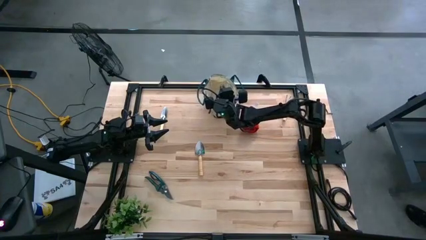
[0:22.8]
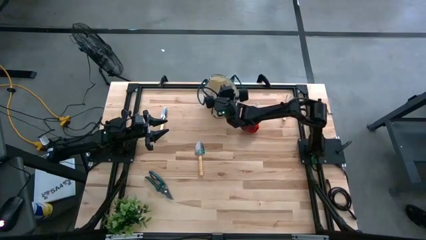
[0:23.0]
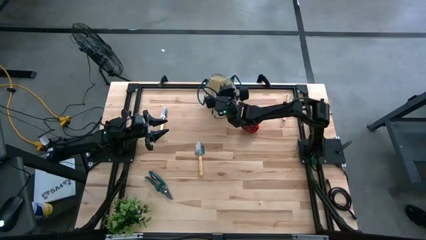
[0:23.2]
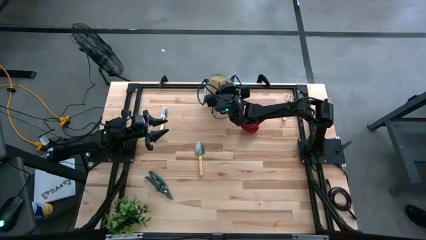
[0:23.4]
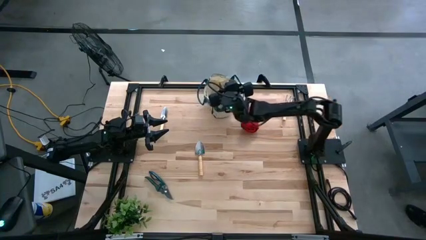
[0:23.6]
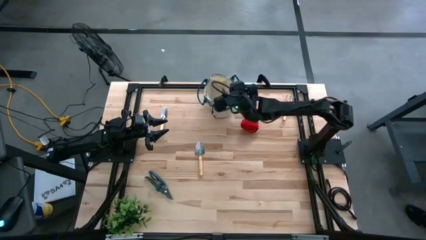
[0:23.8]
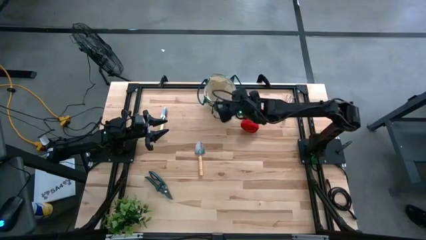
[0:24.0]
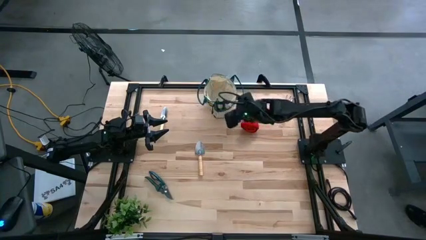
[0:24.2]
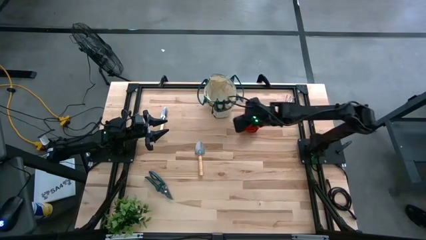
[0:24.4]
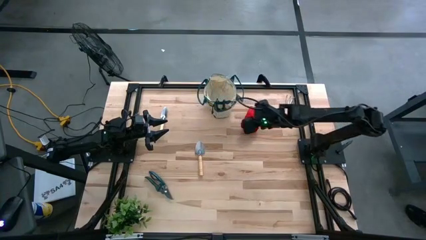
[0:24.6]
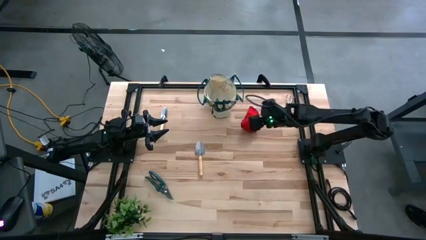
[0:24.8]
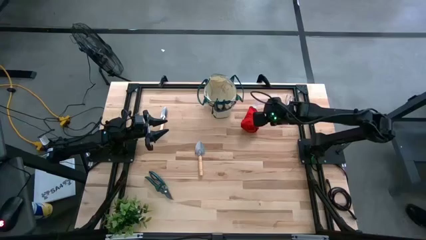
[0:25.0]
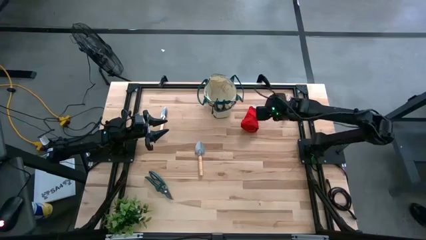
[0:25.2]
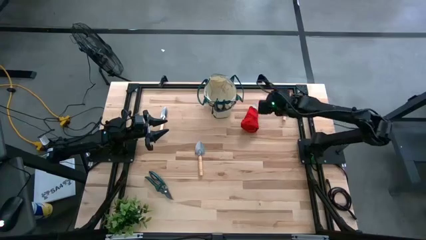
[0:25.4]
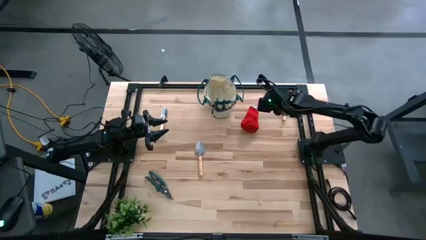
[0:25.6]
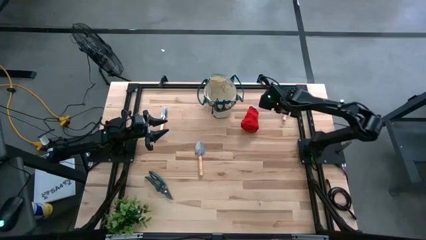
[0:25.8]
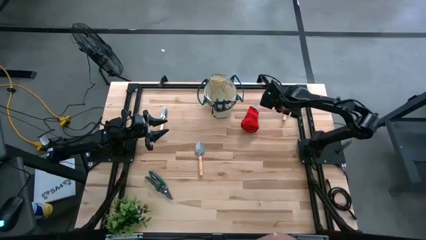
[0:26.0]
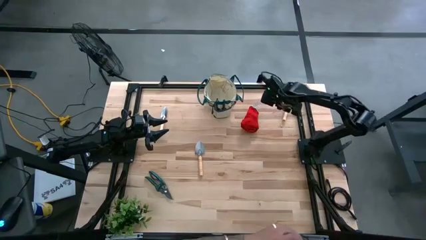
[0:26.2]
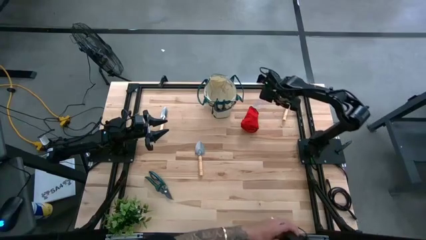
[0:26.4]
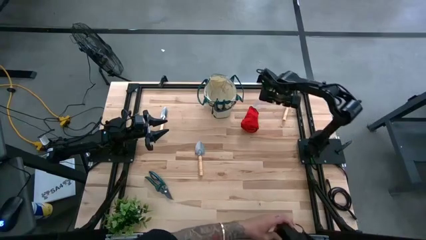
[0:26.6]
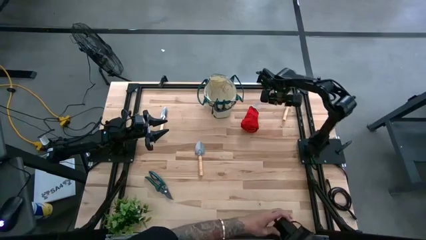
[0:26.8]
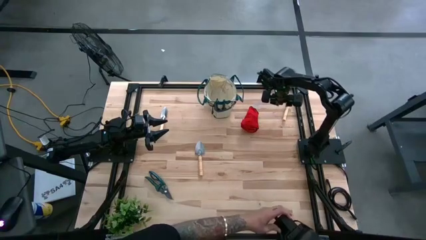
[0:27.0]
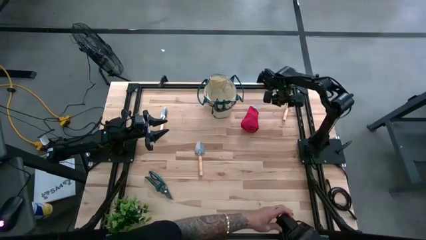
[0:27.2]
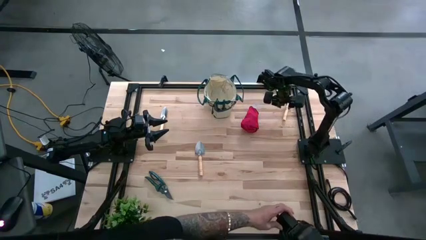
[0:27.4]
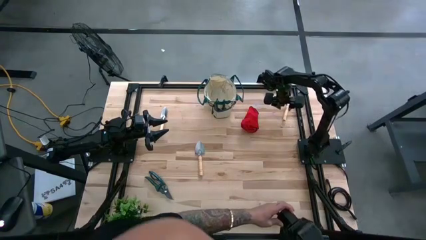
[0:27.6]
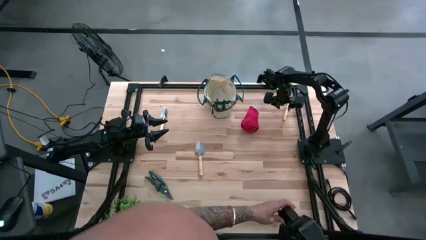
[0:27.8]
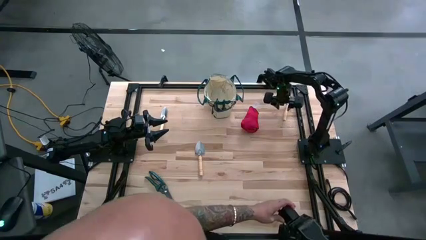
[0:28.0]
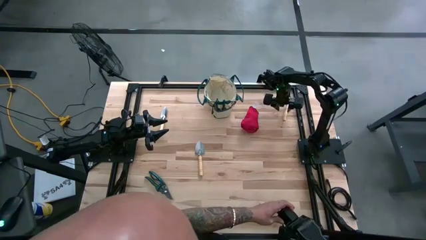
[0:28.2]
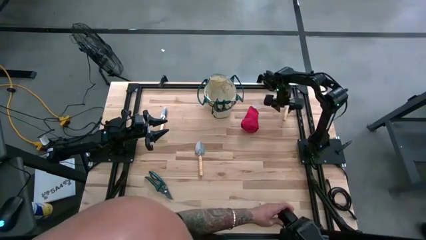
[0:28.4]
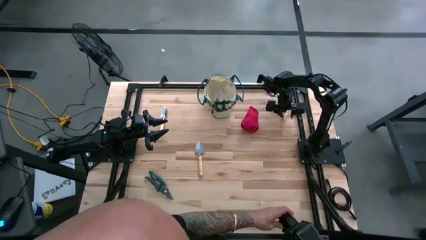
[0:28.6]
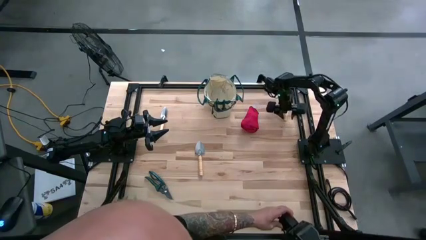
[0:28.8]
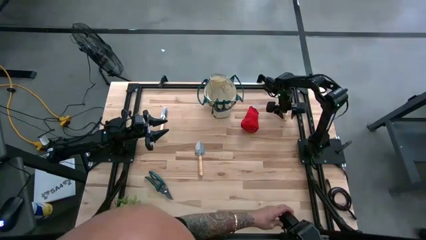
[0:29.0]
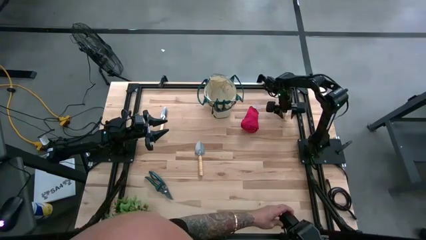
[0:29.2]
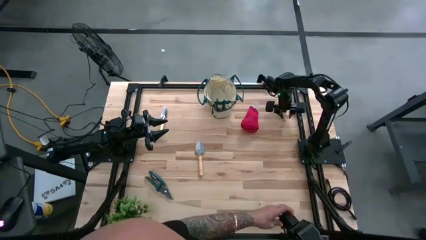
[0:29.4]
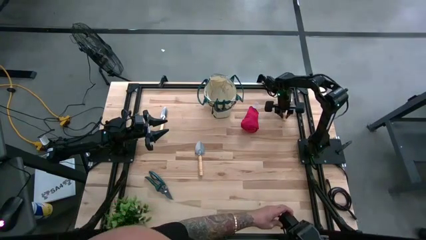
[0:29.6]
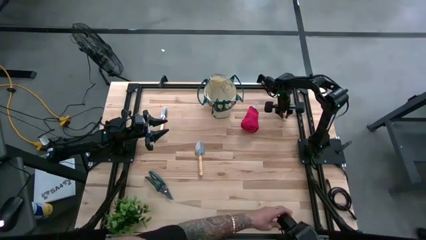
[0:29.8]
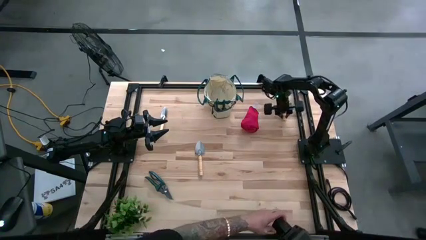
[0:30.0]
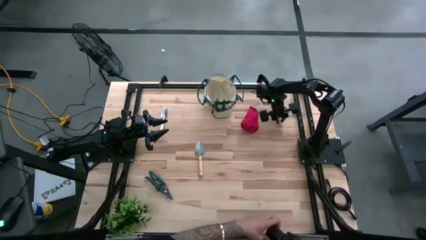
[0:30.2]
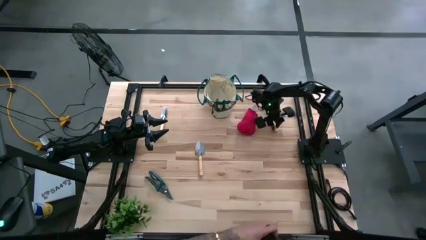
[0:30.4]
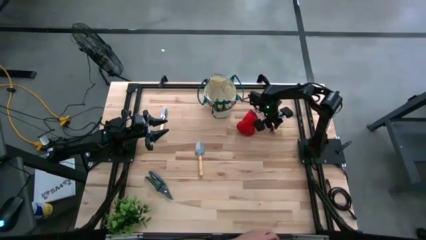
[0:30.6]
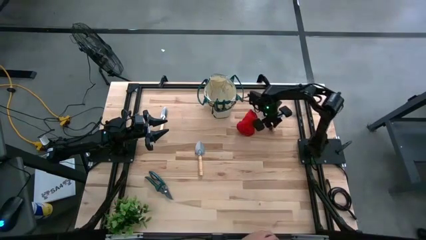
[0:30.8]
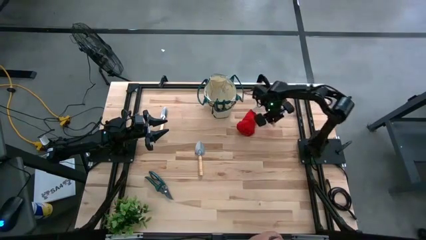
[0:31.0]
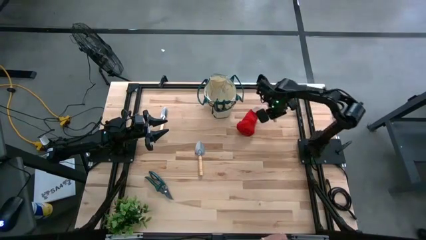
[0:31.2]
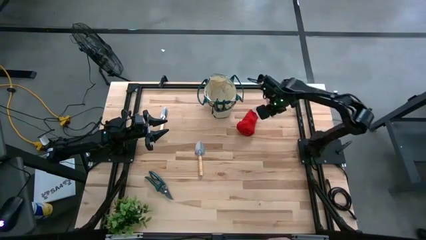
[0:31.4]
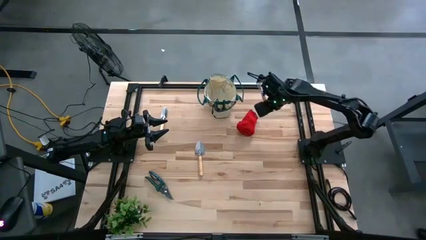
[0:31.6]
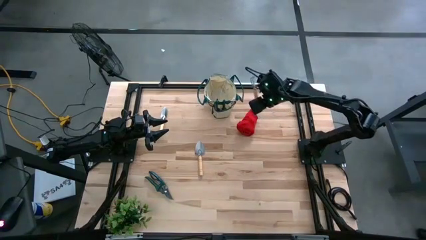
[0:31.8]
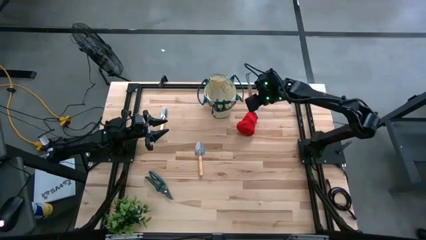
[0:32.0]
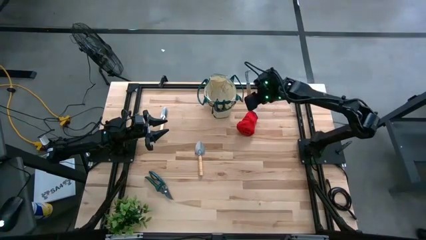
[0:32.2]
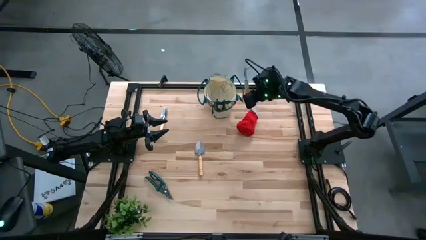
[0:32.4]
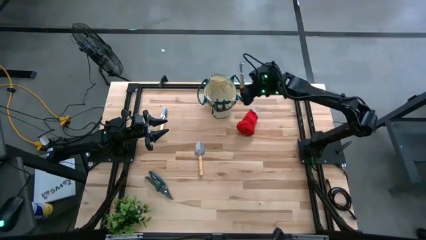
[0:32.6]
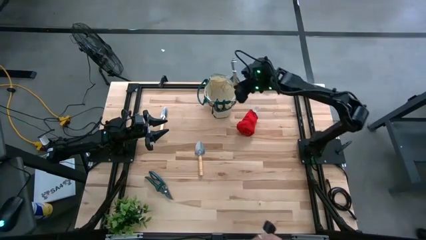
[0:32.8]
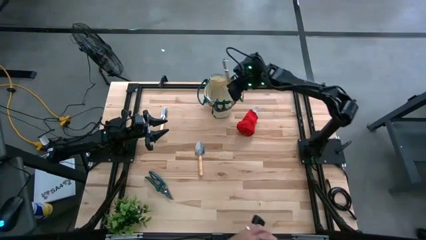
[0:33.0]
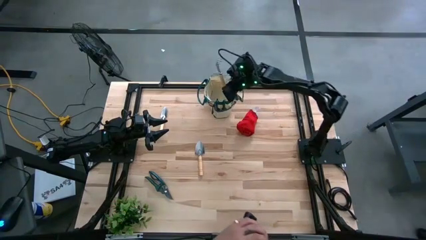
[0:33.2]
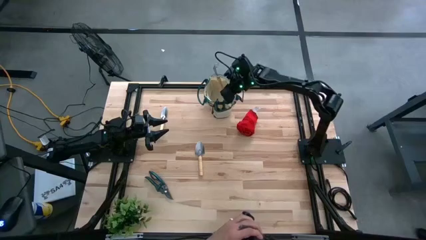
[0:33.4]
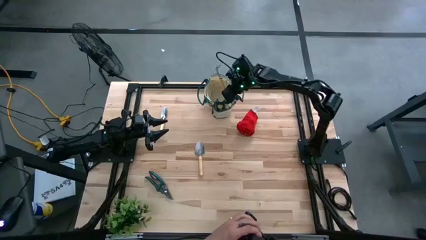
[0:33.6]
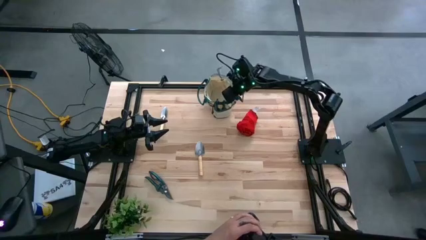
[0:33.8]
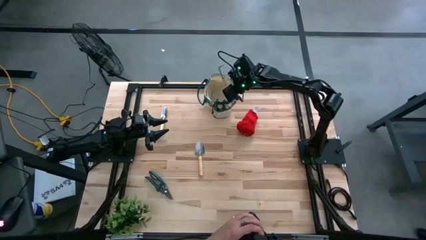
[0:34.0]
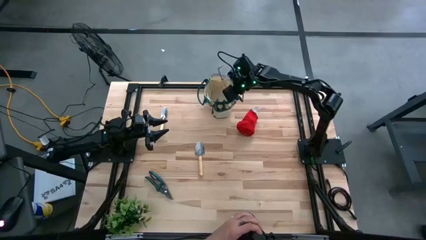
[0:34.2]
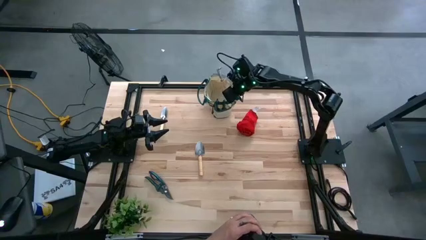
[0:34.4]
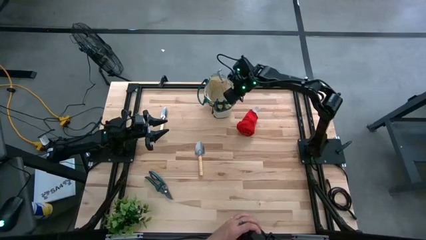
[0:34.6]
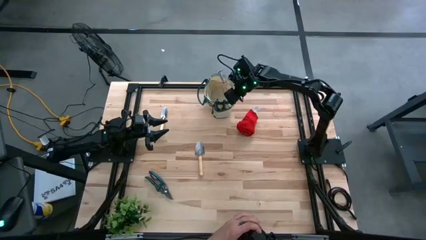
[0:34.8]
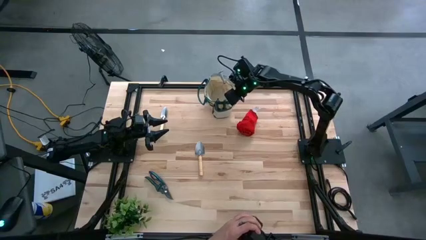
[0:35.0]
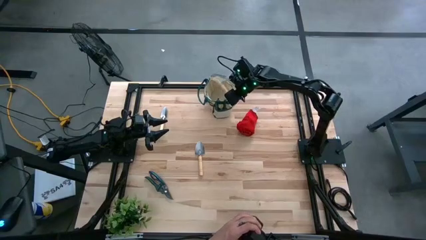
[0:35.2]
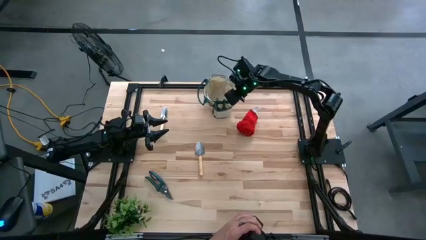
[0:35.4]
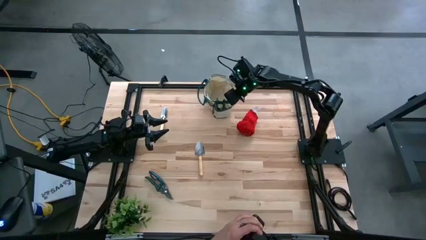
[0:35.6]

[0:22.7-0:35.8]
Task: Pick & Place Garden tools in Gardening bag
Put the brown hand rake into the gardening bag

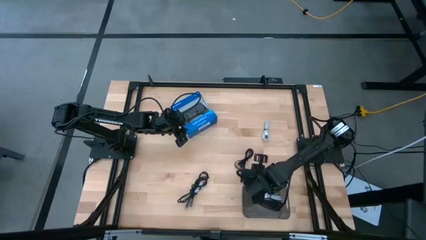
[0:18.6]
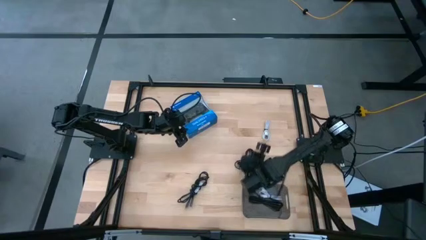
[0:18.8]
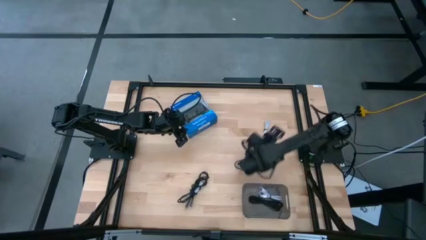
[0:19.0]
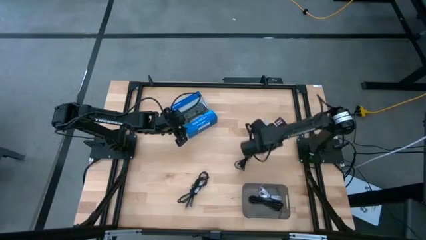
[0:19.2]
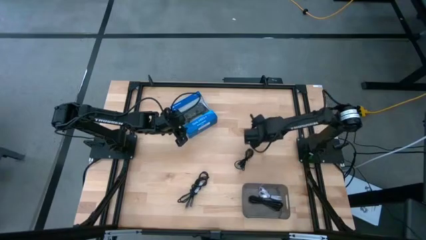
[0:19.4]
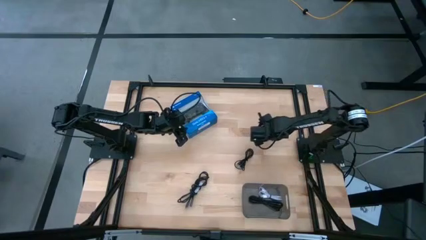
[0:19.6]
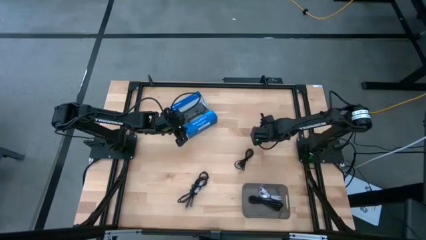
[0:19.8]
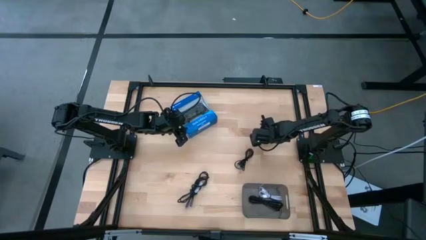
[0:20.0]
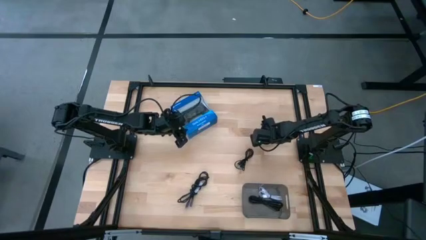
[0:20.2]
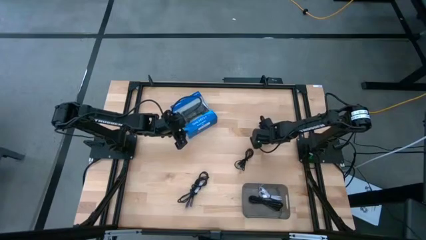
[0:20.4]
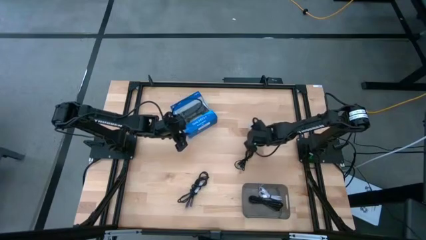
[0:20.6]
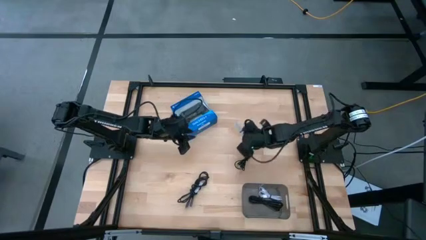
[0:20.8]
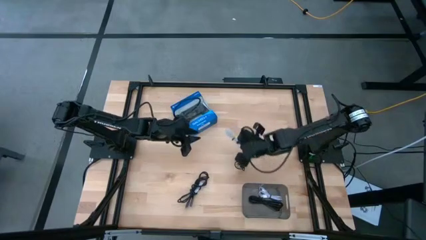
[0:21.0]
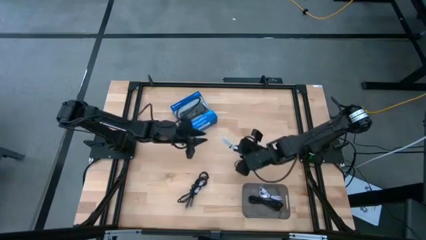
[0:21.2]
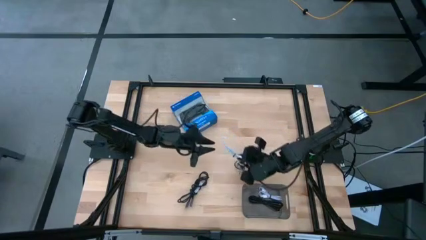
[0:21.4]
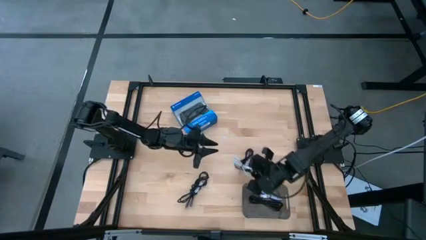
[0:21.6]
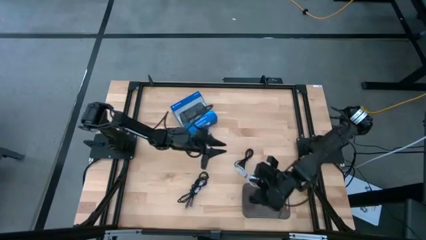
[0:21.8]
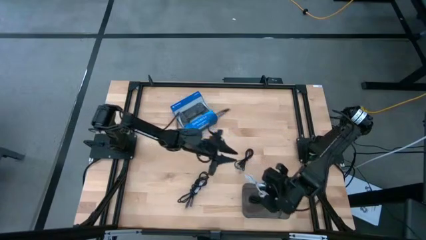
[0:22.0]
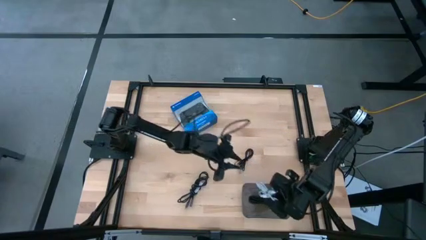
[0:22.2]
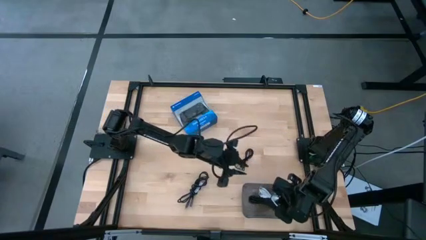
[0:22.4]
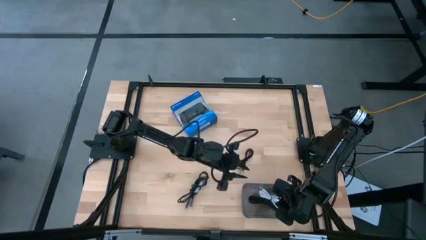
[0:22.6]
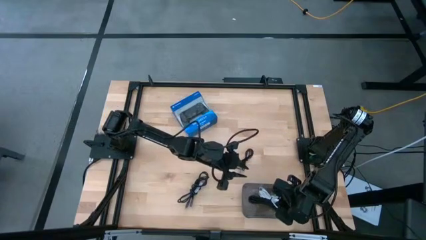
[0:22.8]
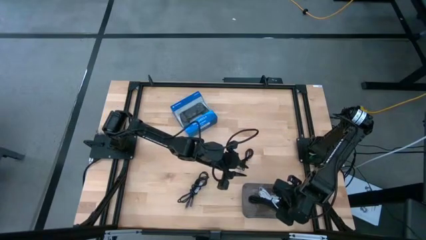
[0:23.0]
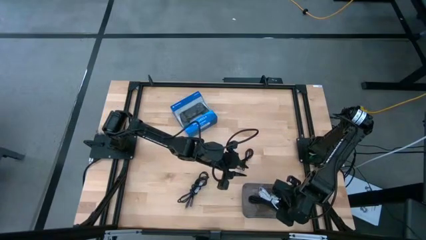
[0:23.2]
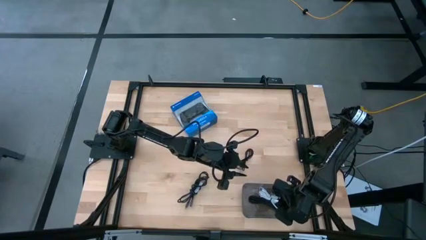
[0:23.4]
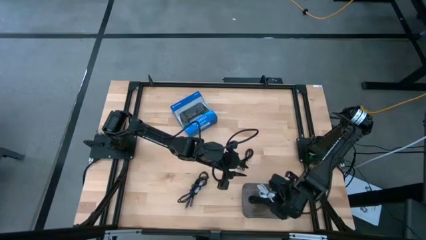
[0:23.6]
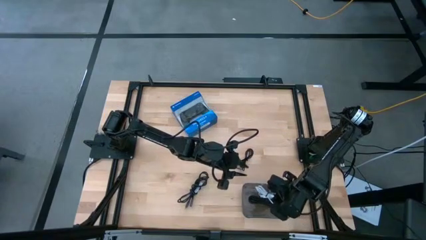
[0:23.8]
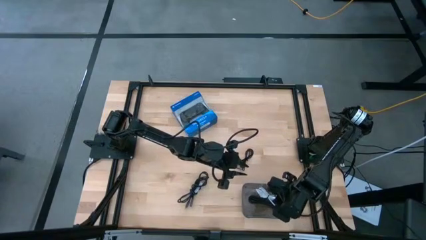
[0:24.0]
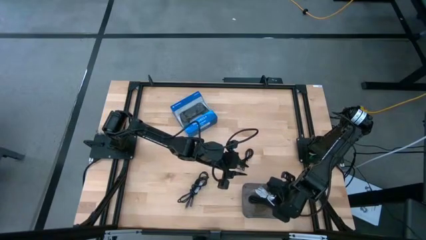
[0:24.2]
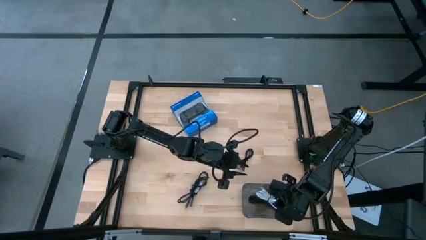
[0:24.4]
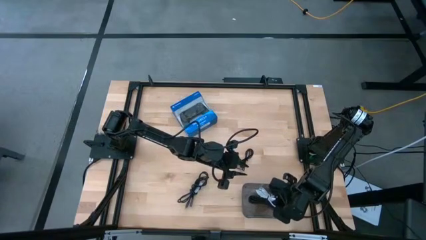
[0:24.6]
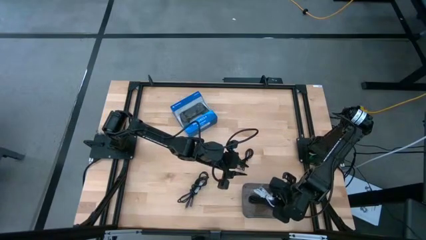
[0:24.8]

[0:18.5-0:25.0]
Task: Pick and place USB-C Cables
Put the white usb cable into the grey transparent bin
